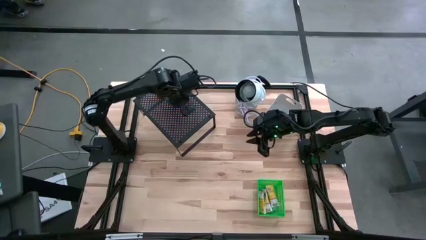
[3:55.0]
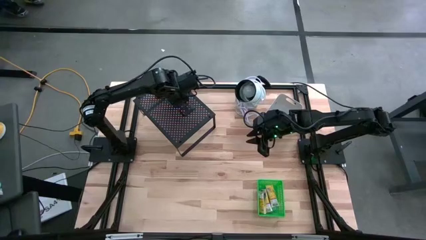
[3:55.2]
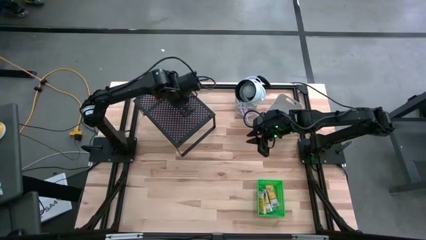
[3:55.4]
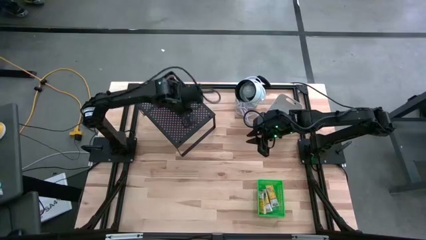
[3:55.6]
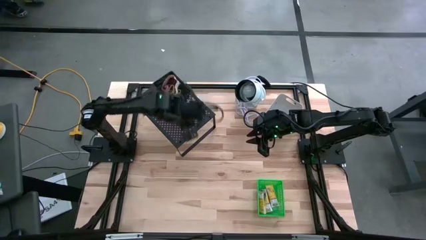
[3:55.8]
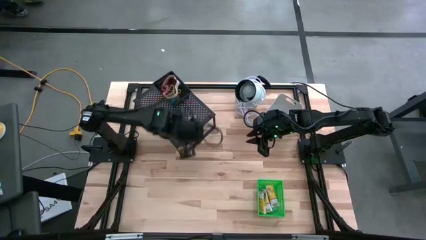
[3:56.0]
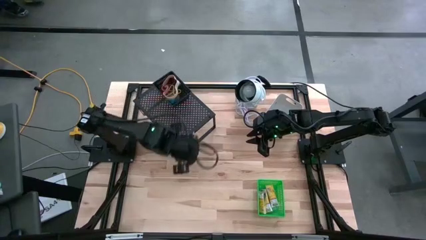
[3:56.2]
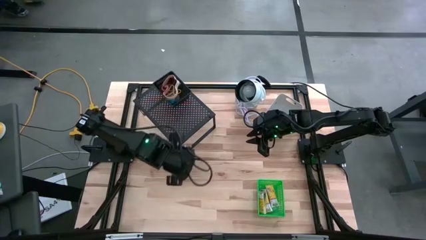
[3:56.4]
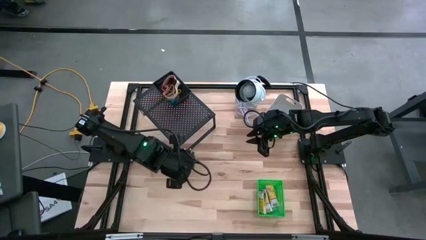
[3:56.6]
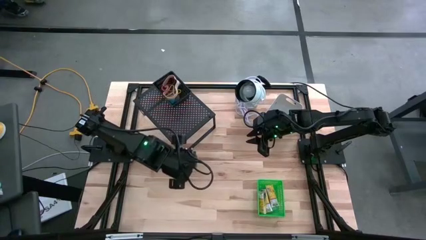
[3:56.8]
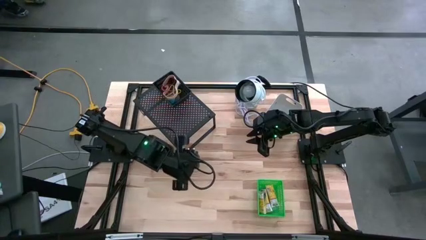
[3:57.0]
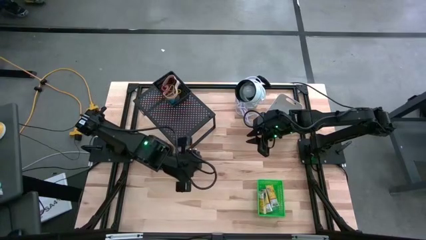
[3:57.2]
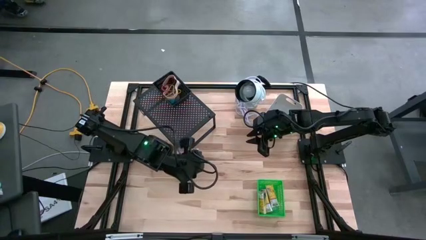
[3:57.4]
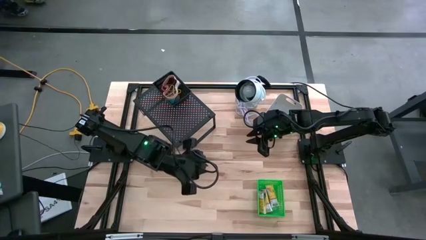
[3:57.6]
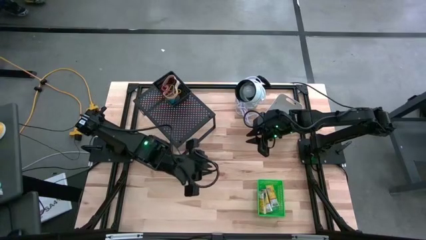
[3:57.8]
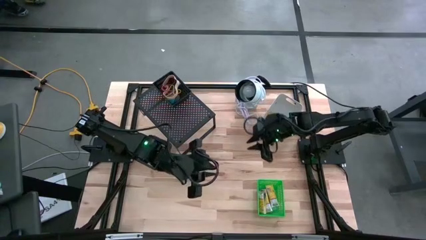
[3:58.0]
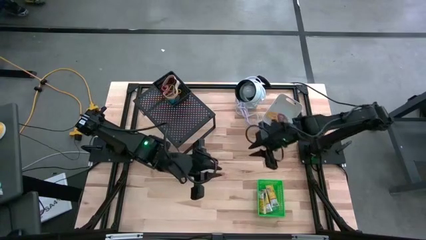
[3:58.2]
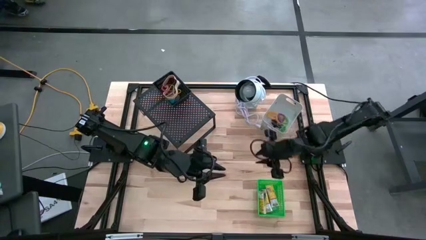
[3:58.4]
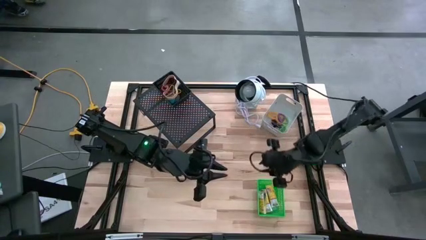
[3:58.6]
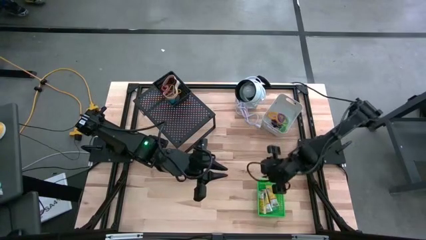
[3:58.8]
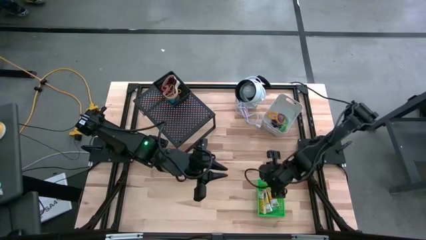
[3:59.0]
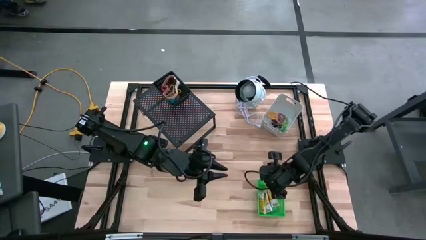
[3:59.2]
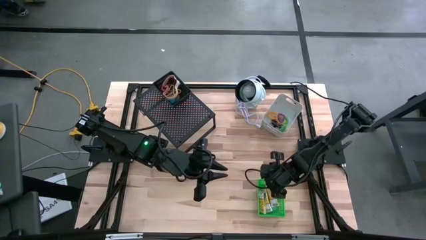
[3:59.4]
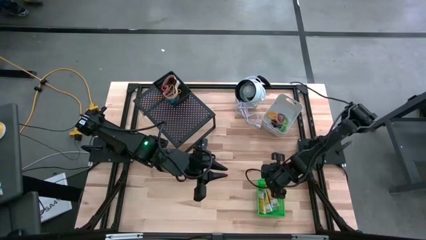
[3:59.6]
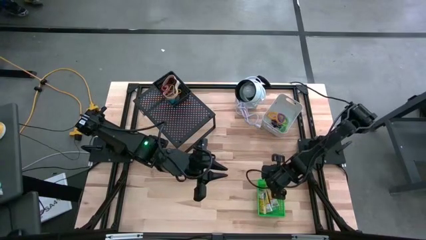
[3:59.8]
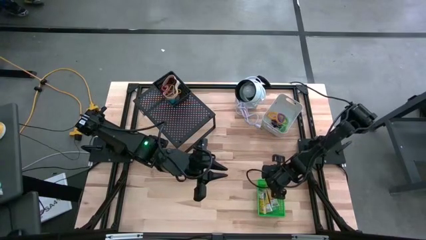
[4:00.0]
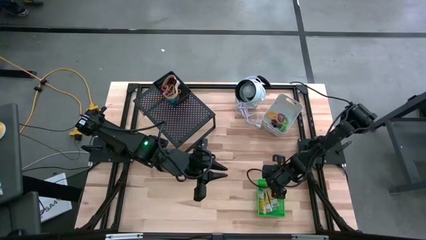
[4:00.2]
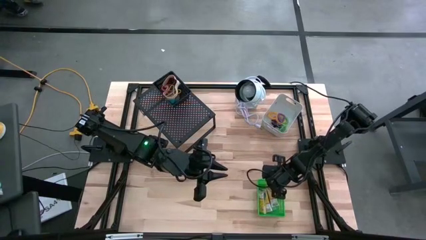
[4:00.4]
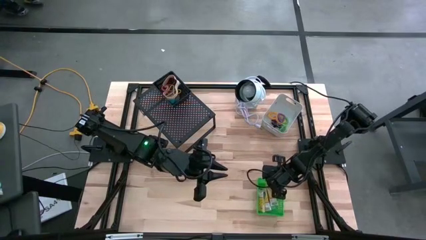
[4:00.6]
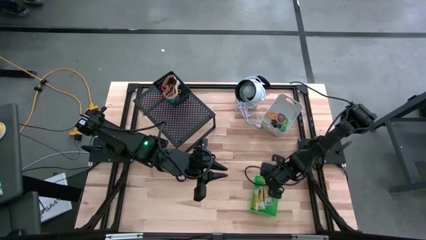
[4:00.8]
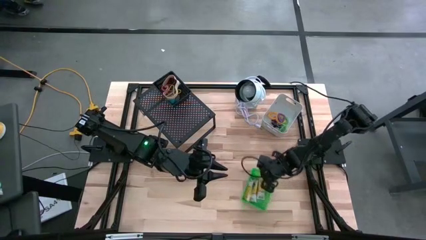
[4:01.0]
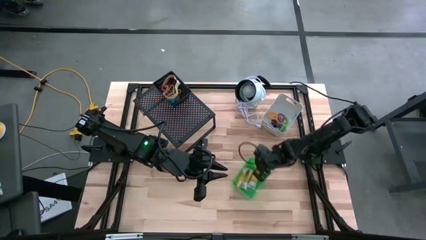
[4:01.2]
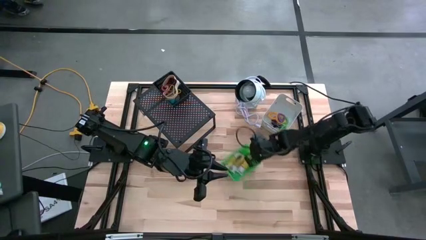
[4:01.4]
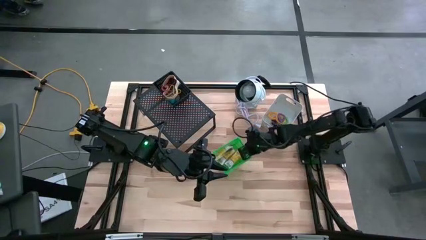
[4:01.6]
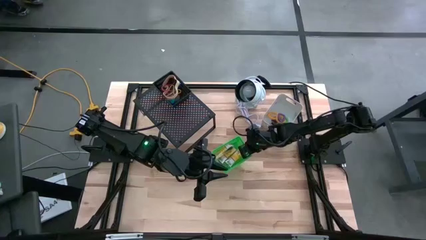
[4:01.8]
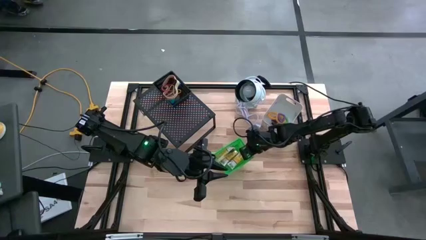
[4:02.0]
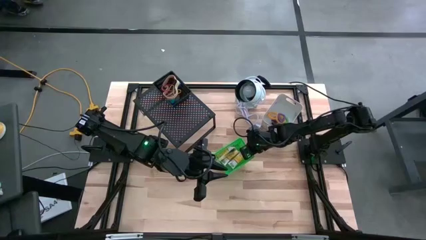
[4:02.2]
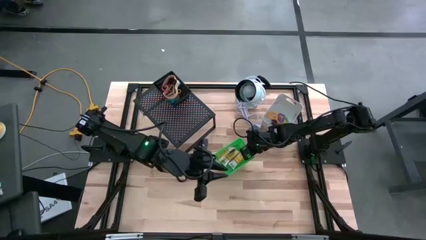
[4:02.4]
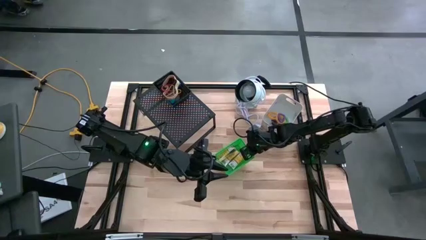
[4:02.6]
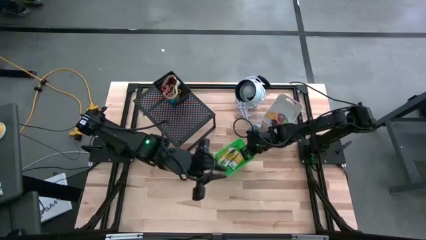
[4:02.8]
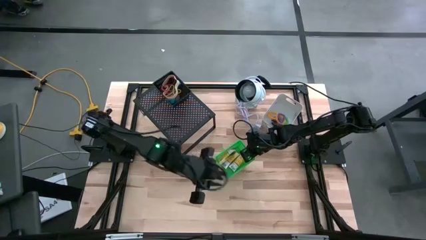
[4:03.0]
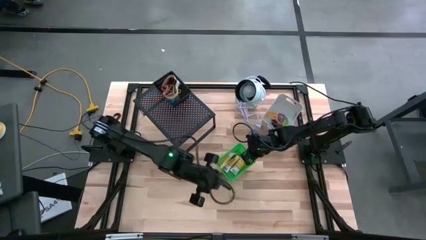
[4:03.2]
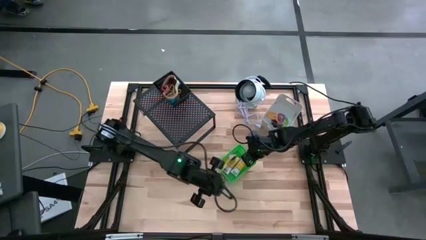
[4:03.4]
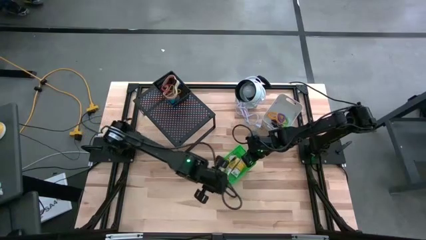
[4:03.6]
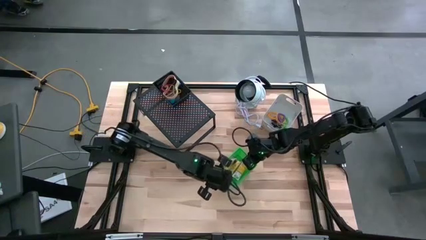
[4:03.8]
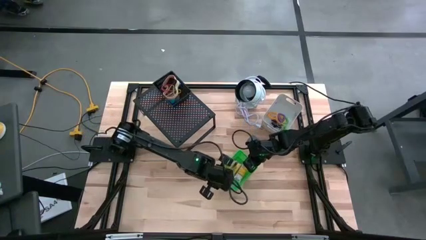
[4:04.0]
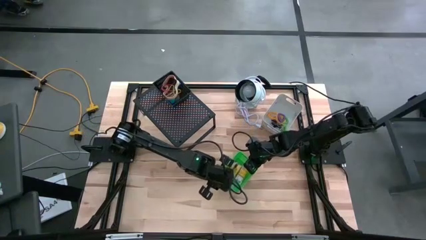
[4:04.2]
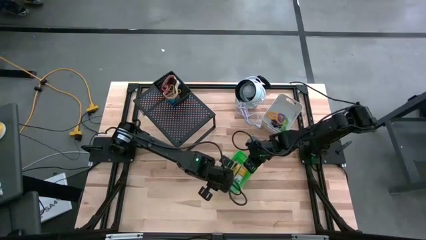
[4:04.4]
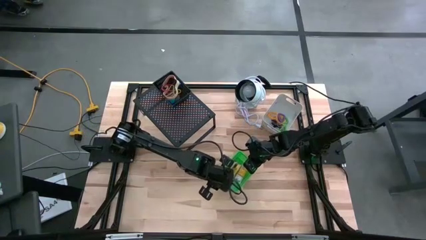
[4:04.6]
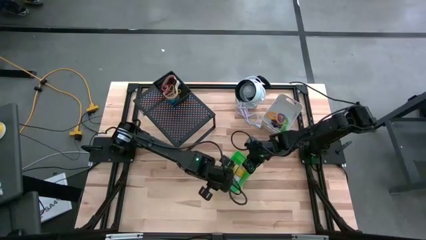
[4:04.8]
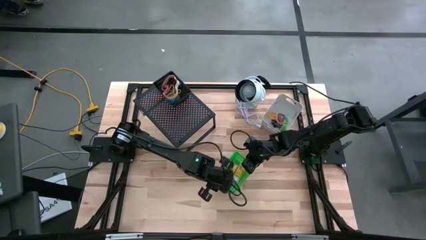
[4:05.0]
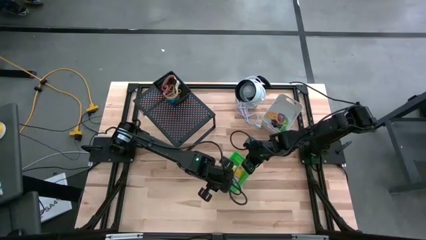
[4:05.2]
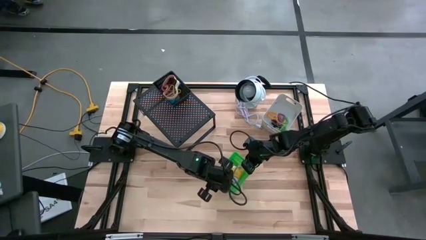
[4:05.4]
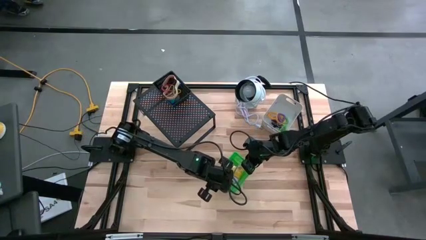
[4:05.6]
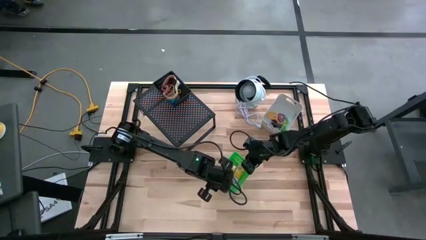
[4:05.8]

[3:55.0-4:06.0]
Task: Pick & Place Office Desk Supplies
Put the green bin on the shelf

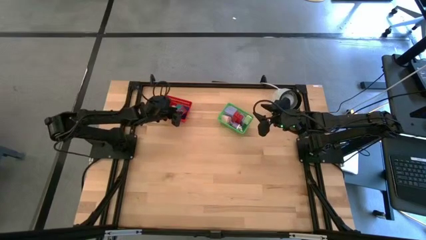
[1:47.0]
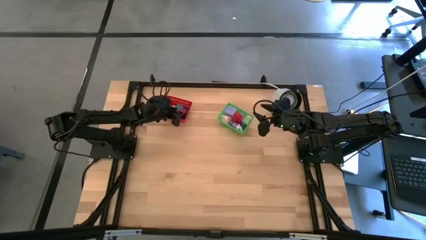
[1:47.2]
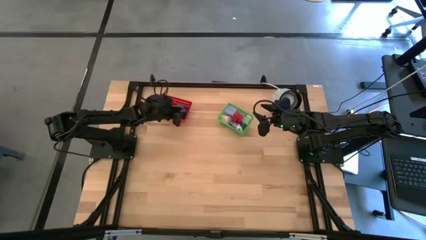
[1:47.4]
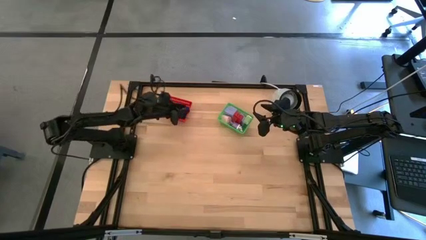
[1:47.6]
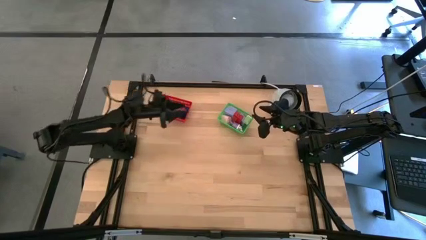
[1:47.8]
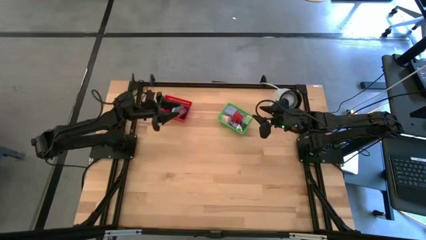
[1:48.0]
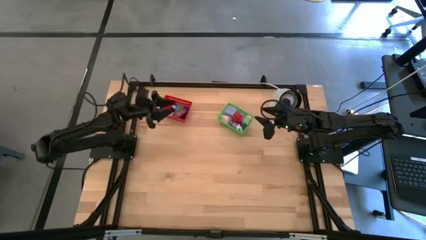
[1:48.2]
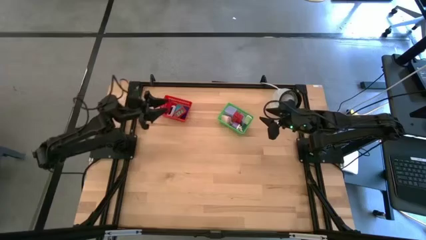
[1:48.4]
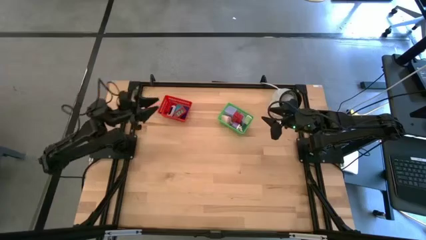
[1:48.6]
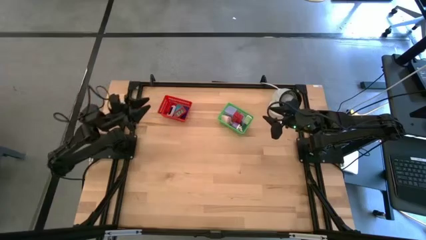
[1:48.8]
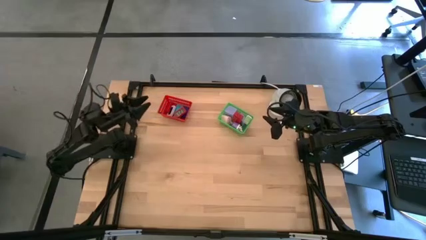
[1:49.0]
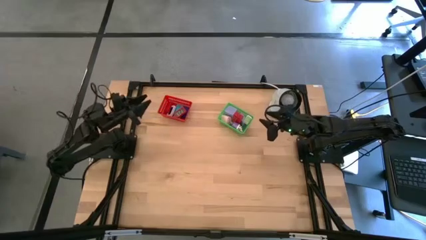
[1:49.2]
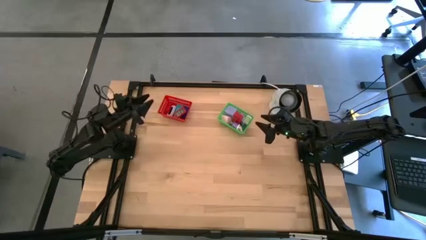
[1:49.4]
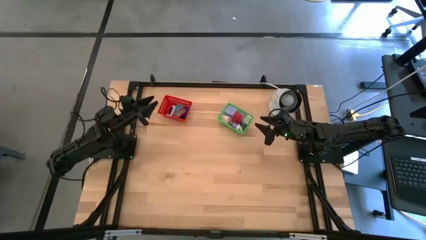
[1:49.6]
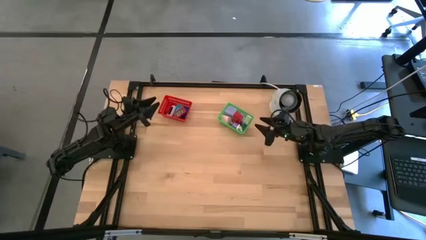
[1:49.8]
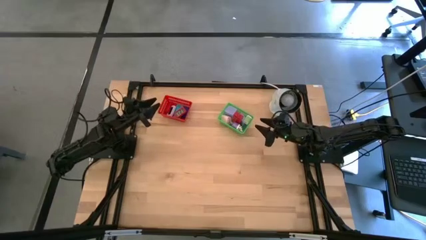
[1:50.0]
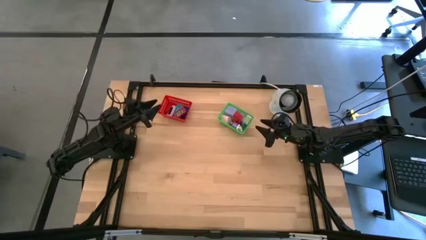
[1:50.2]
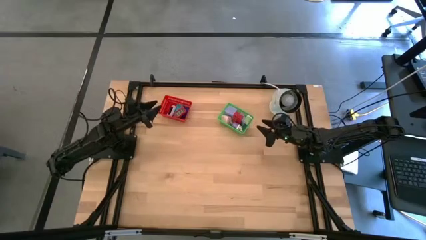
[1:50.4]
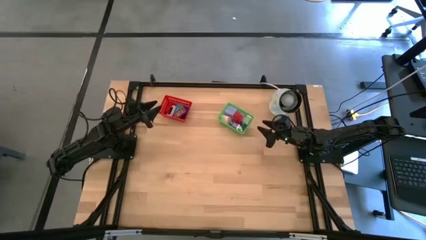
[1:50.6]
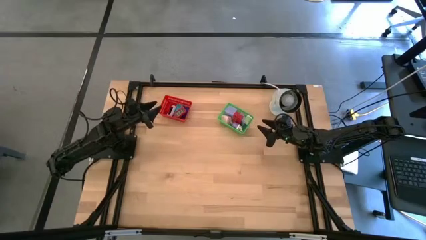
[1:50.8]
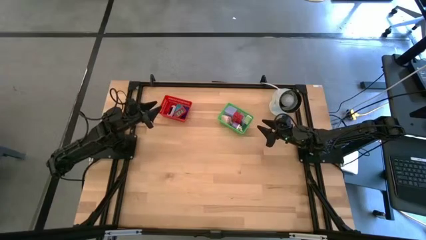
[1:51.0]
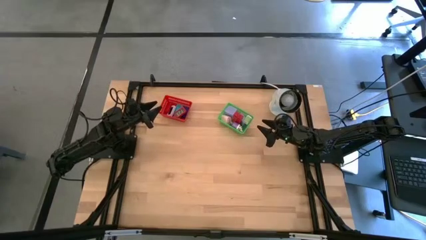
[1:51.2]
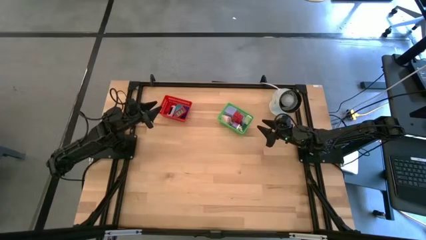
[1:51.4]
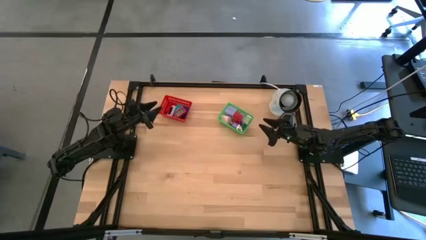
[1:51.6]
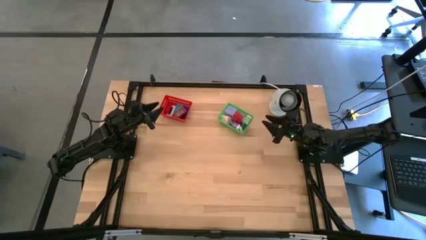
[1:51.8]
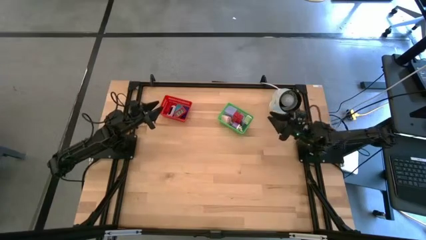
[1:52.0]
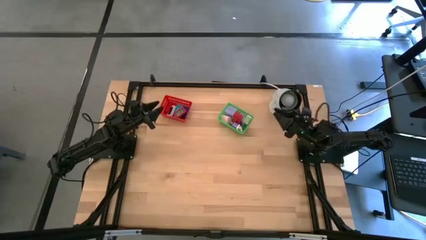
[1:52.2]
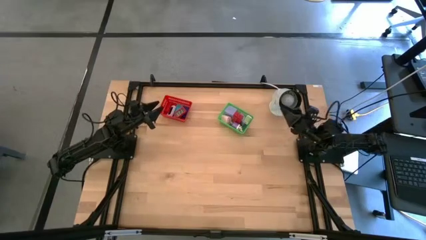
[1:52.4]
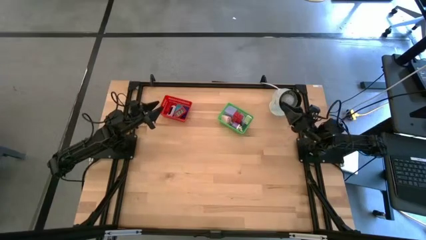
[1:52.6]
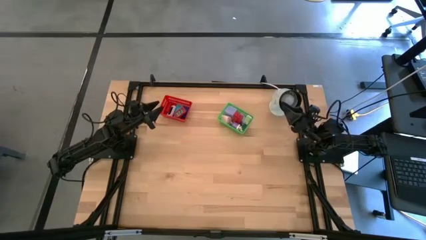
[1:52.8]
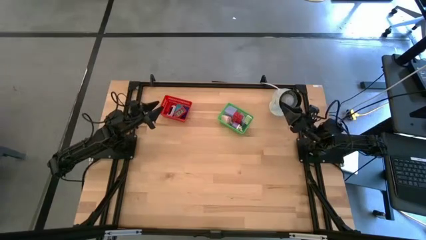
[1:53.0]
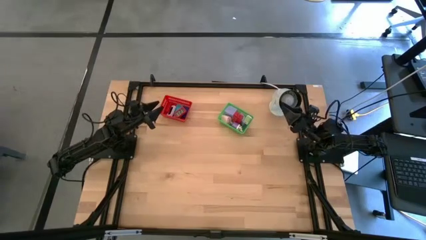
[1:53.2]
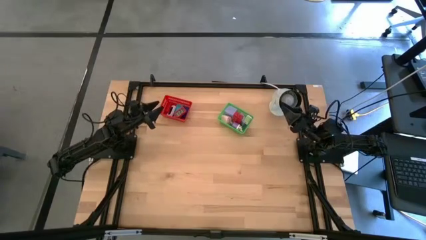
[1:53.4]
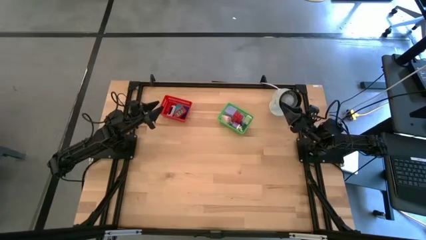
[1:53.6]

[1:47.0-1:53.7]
Task: Pick & Place Office items
Return to Home Position
